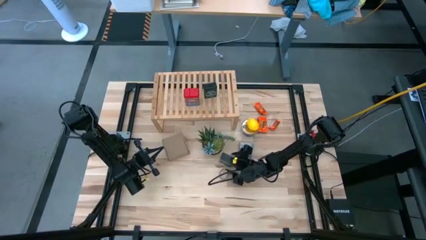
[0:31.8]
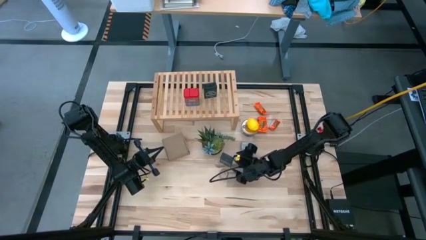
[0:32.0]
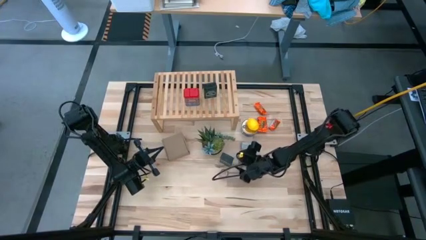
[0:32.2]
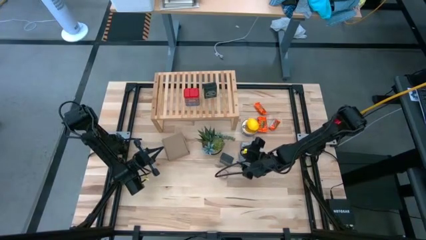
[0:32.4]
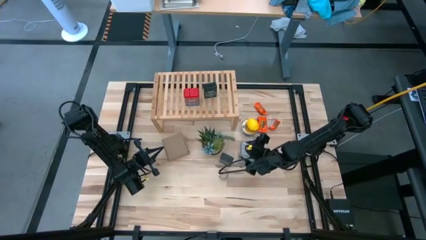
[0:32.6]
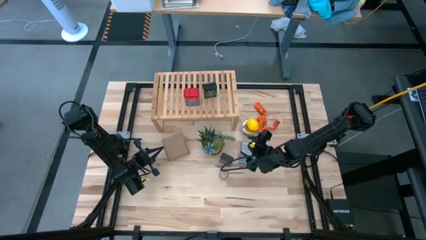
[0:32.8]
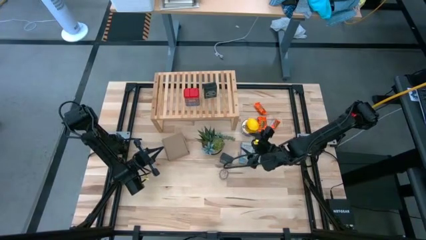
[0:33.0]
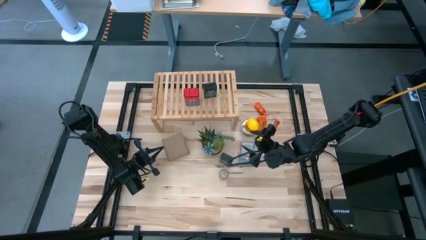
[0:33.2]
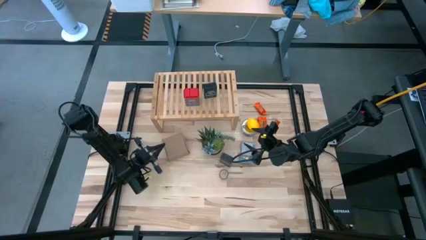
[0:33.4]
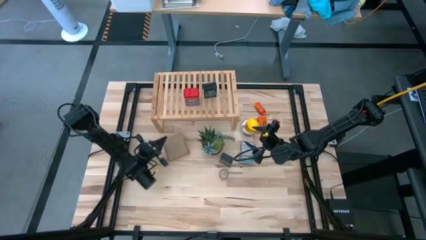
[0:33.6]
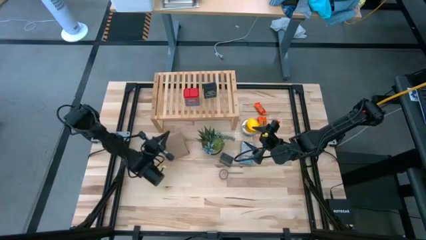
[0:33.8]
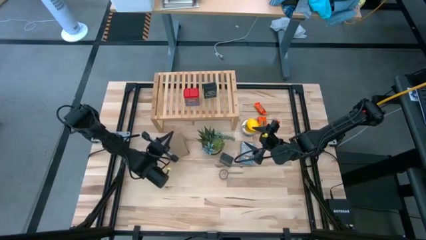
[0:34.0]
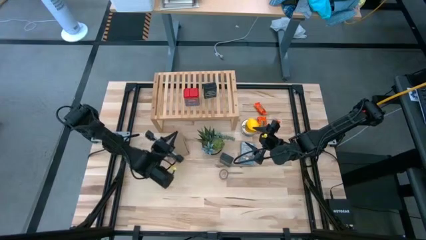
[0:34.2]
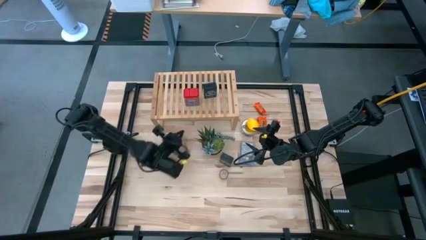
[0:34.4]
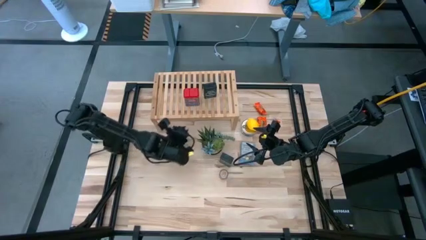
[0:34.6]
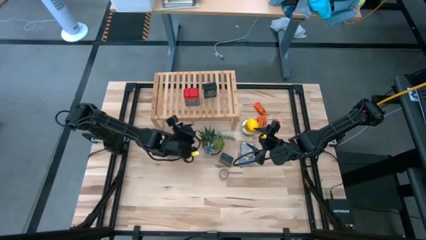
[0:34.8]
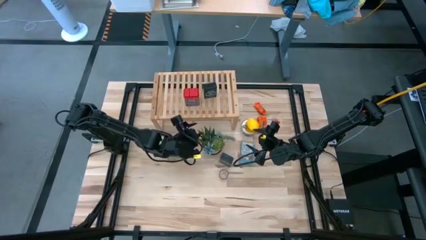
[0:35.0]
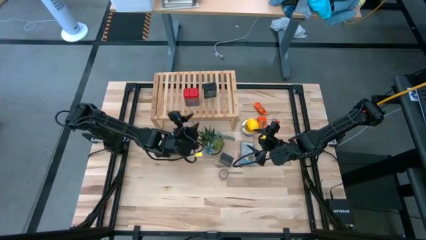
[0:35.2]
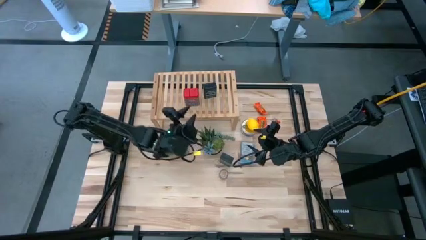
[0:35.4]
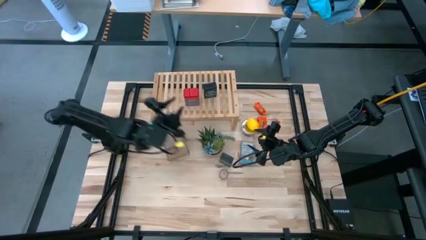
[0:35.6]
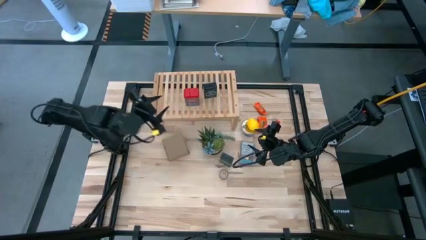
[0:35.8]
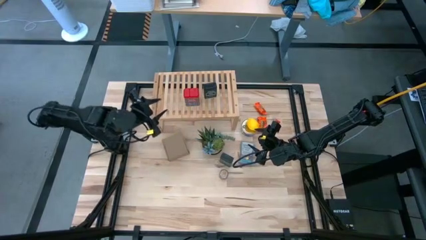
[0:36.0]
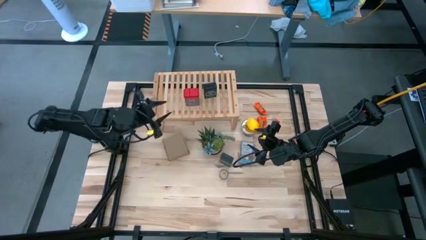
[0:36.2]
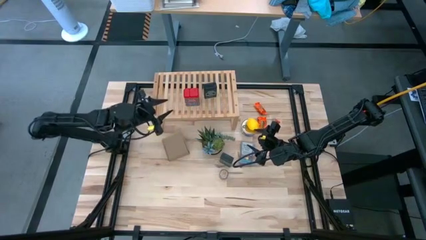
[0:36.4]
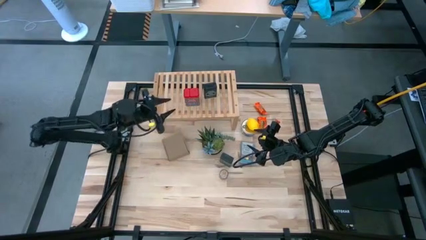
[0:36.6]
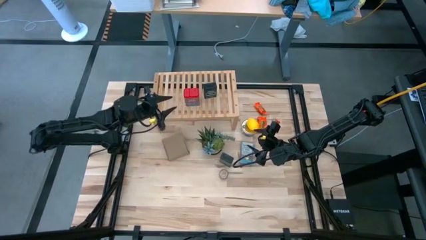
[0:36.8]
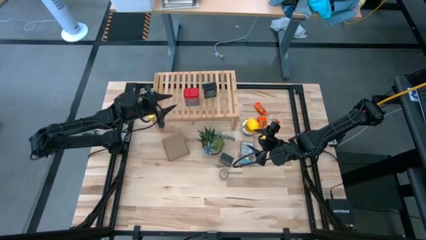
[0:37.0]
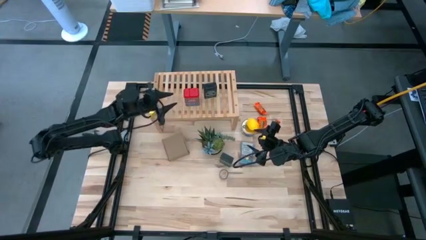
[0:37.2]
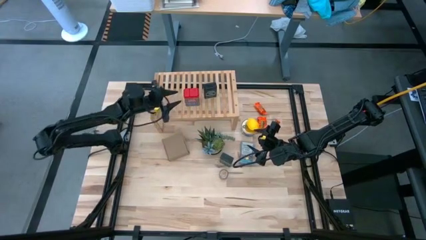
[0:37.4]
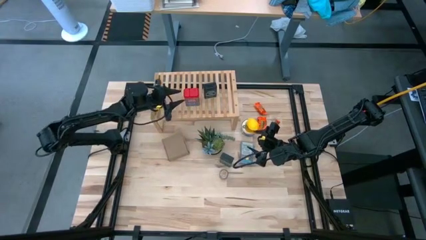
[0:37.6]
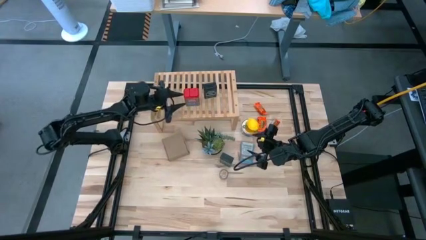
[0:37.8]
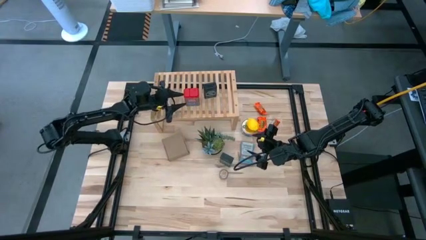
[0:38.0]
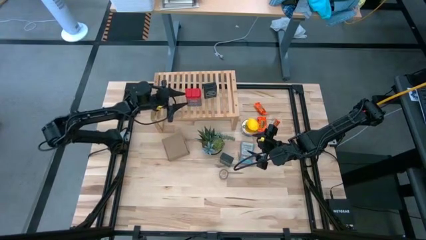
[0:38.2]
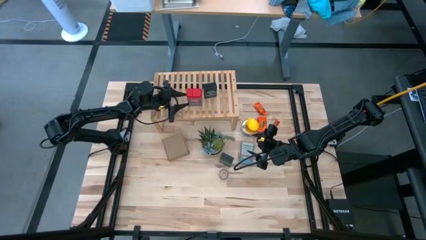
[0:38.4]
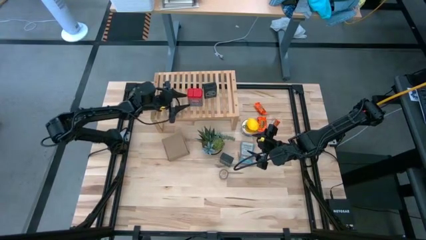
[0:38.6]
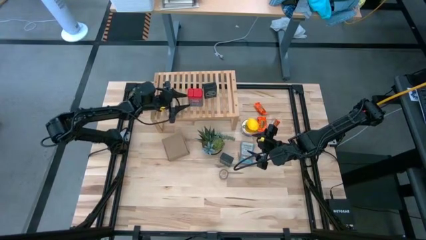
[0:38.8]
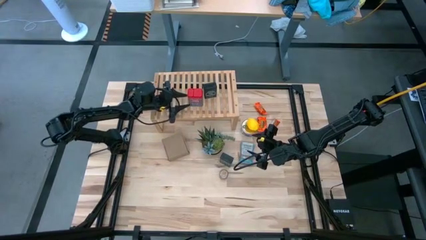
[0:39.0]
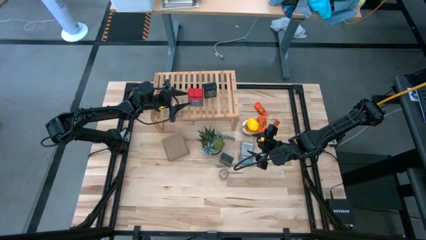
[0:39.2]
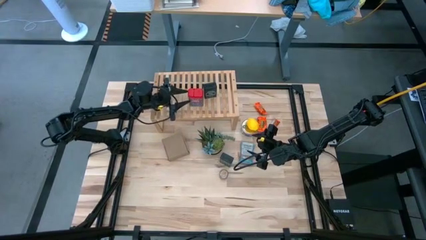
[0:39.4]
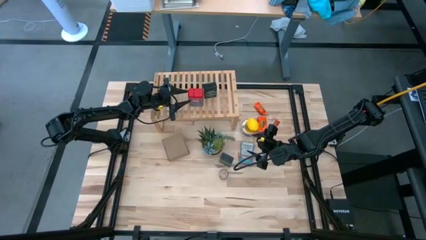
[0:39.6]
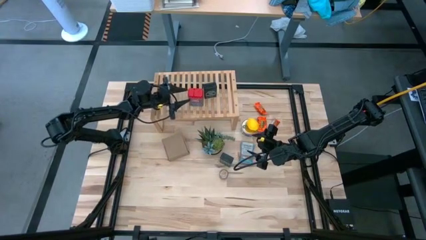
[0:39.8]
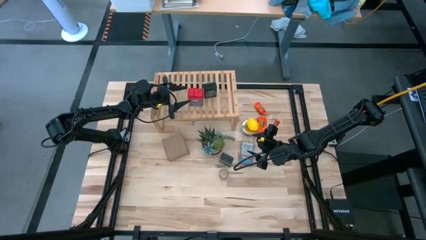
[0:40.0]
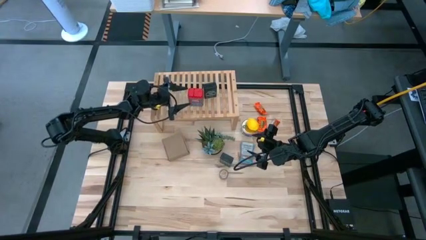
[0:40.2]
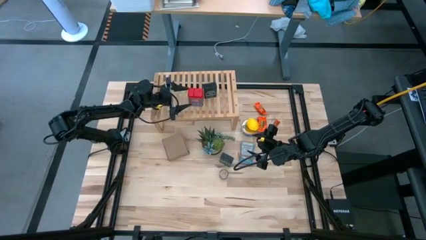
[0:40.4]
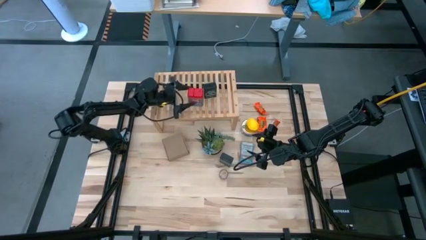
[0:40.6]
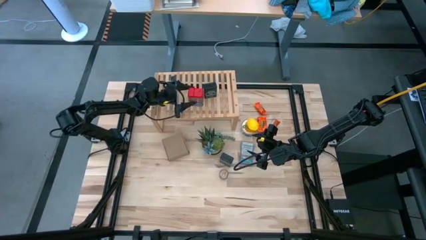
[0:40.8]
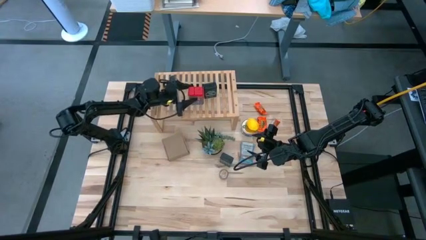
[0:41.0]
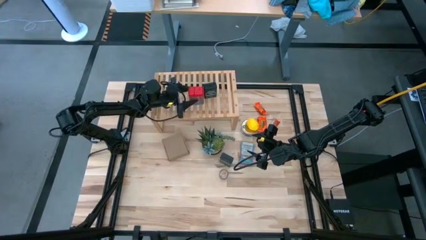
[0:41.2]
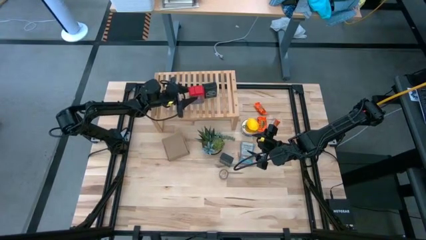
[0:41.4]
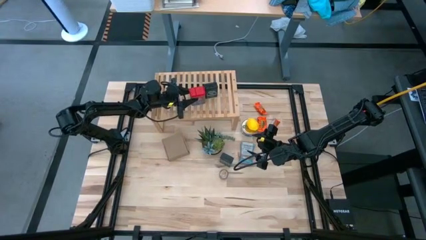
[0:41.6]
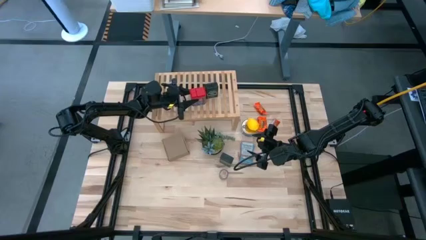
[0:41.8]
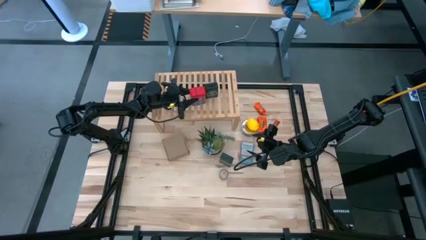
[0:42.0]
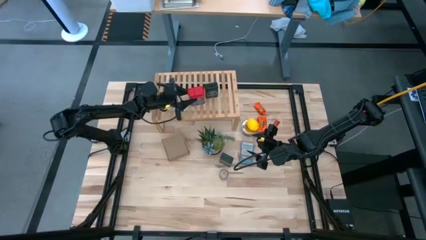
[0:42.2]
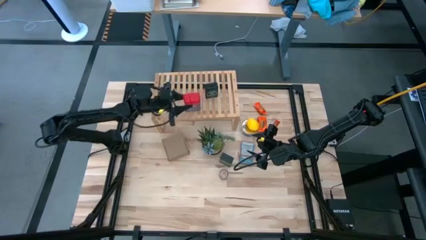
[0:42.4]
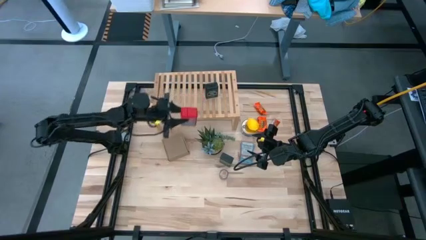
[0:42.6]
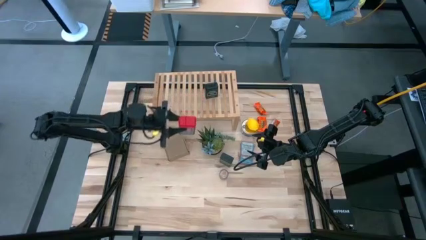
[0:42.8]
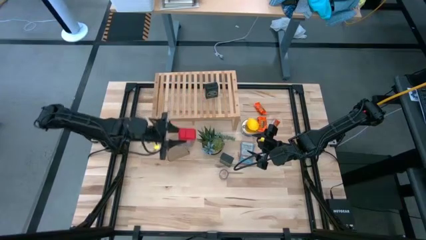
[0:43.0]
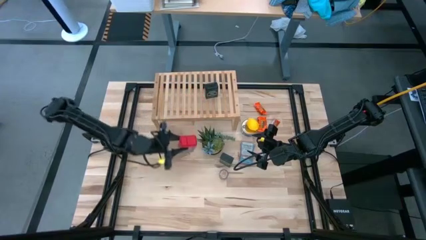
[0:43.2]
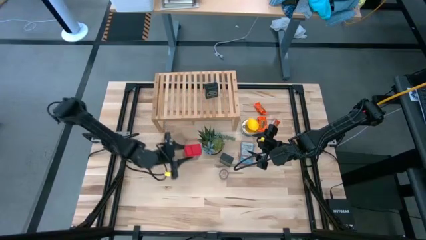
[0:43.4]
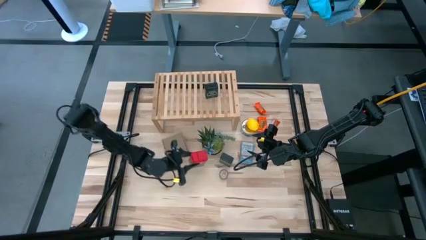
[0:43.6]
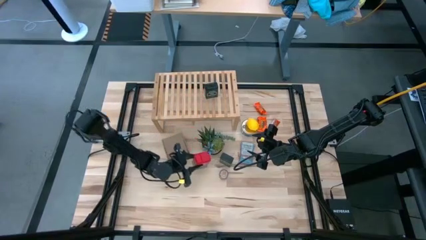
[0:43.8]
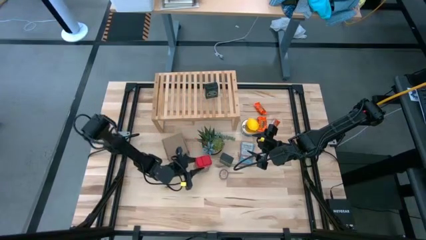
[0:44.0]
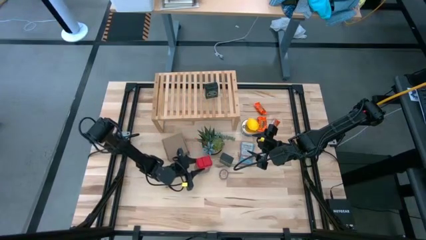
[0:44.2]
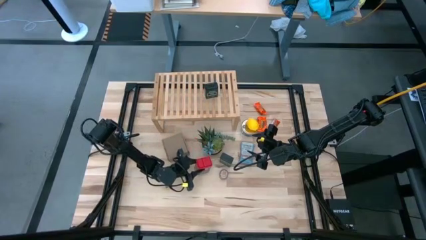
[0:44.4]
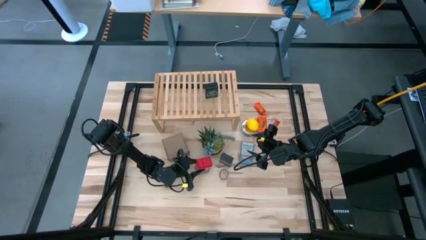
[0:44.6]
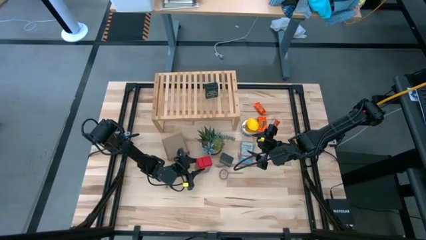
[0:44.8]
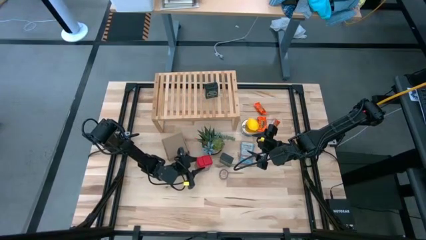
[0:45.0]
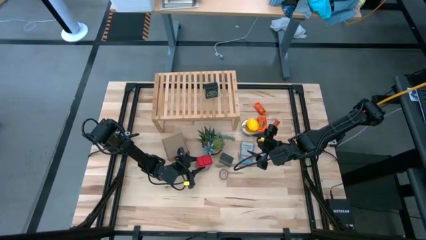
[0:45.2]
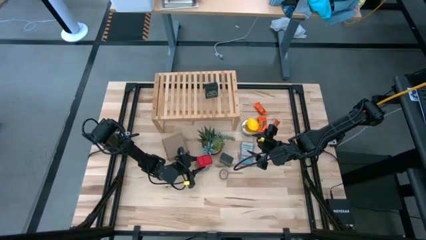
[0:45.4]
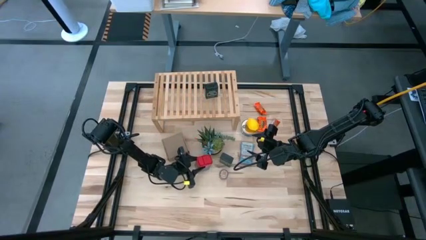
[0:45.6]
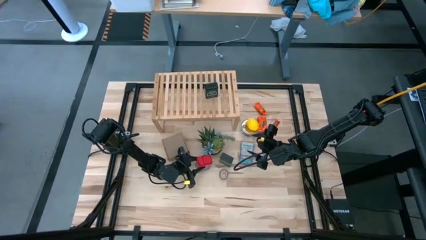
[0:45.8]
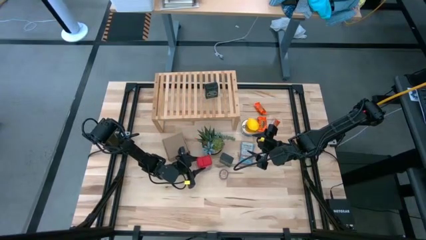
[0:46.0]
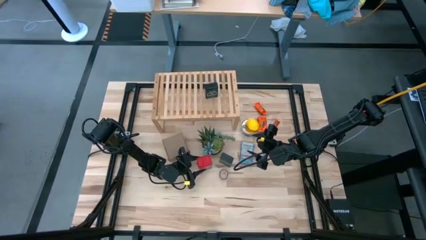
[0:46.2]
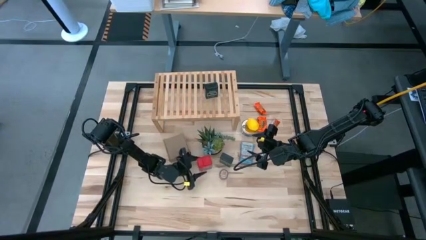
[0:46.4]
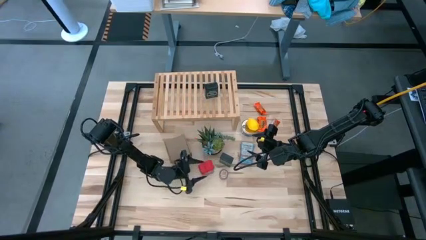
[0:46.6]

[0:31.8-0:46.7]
Task: Shelf spices
Remove the red seasoning can from the shelf
